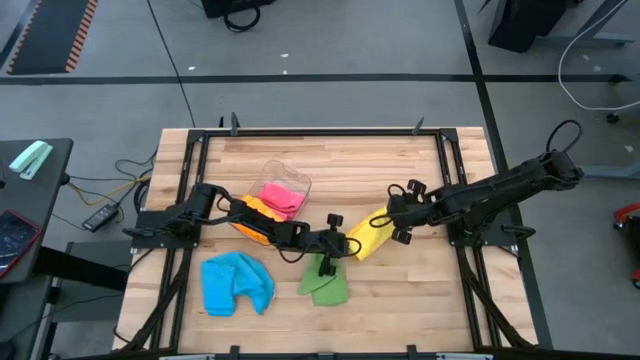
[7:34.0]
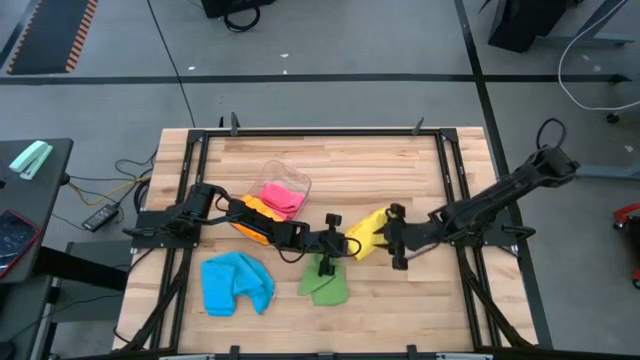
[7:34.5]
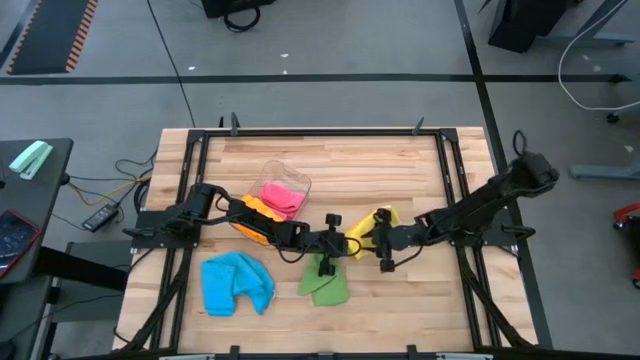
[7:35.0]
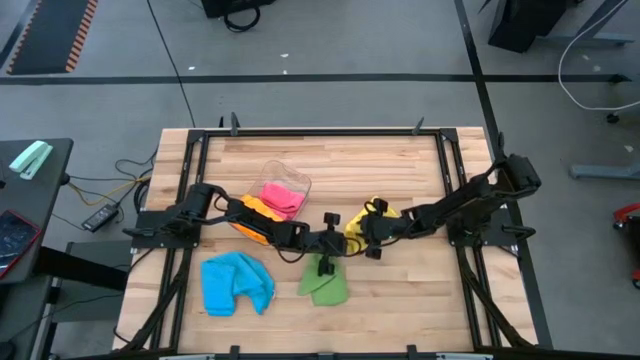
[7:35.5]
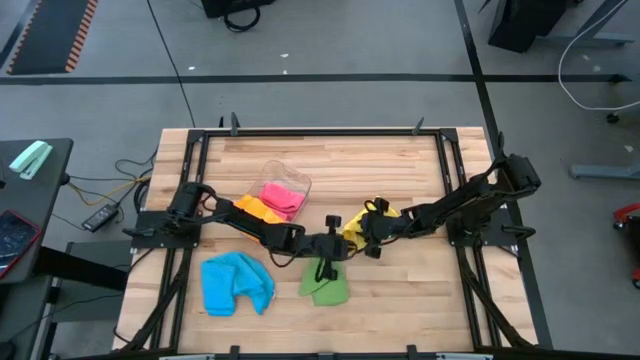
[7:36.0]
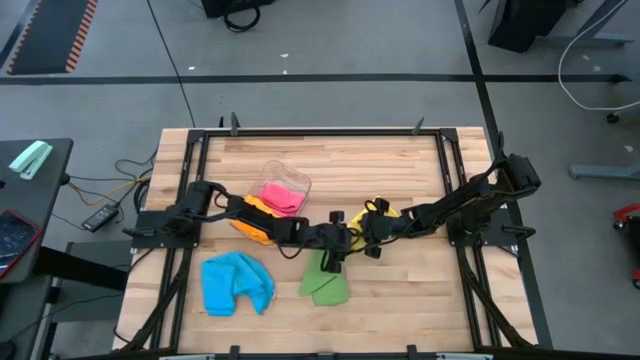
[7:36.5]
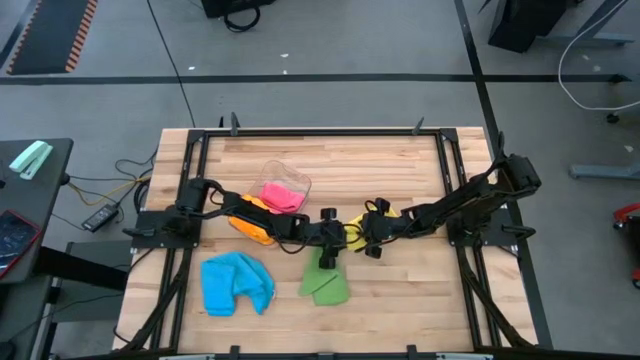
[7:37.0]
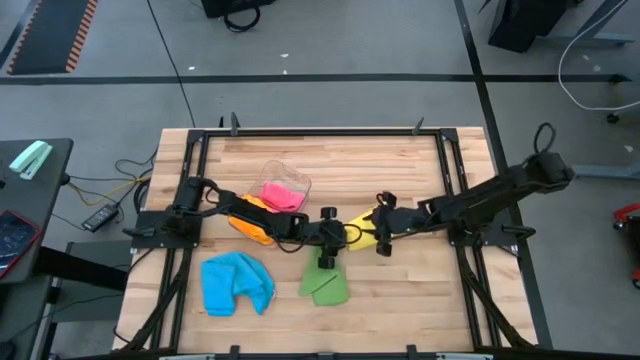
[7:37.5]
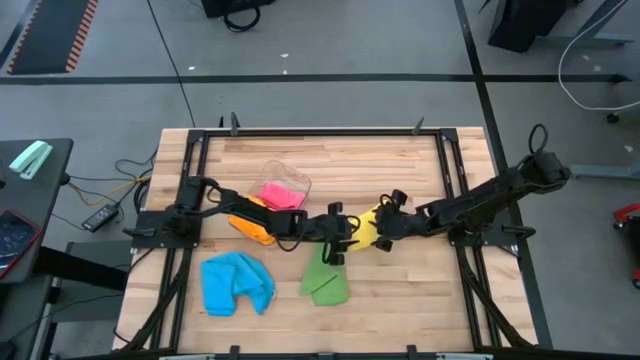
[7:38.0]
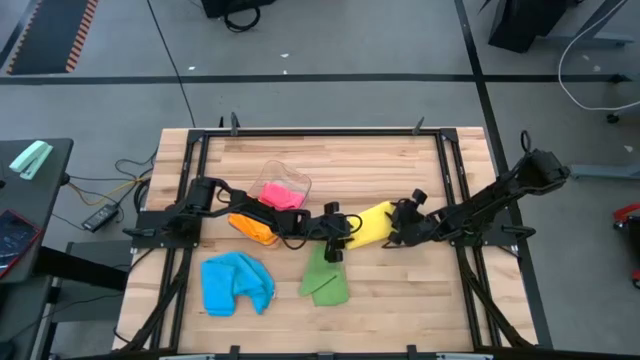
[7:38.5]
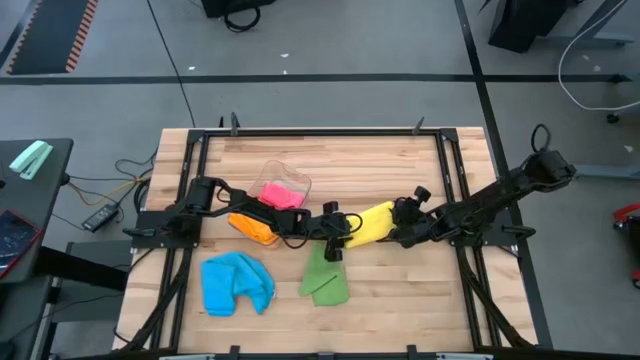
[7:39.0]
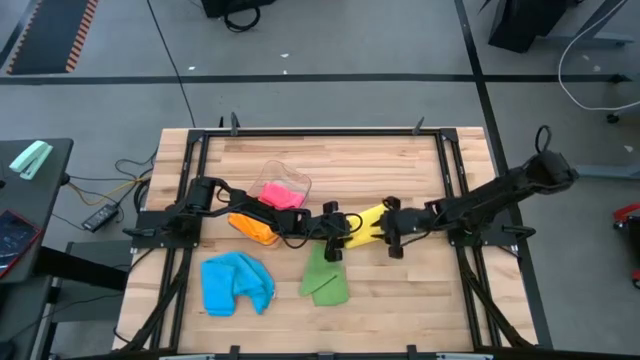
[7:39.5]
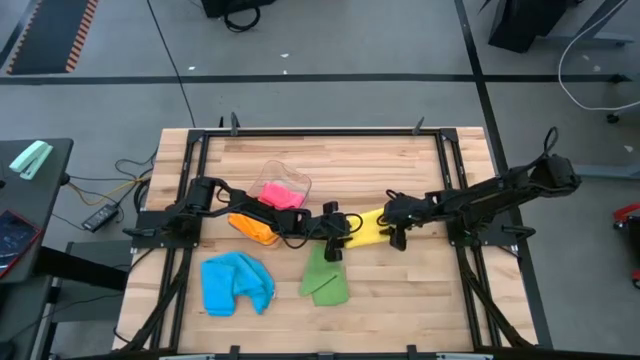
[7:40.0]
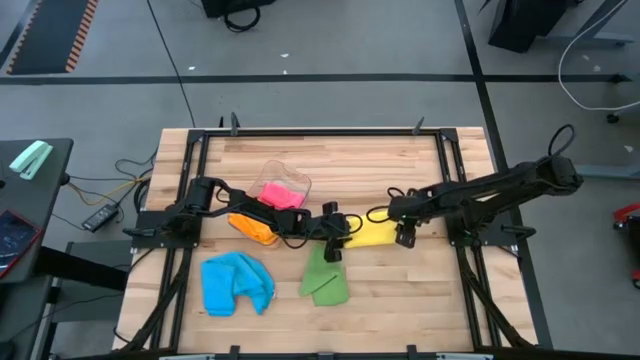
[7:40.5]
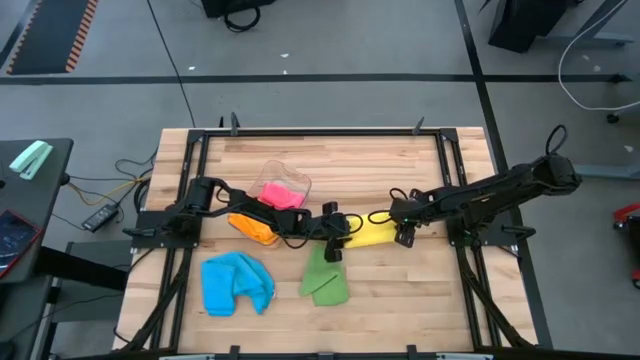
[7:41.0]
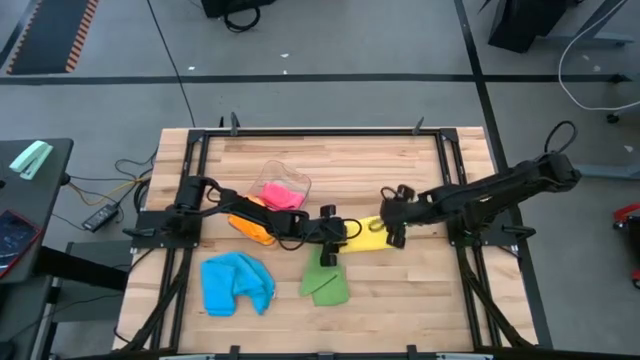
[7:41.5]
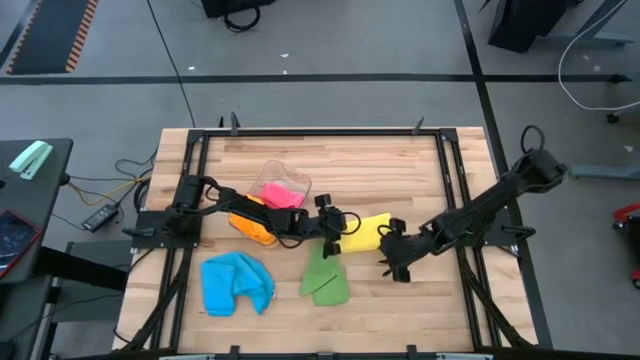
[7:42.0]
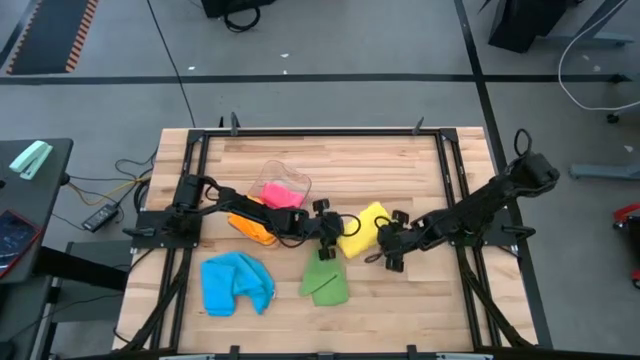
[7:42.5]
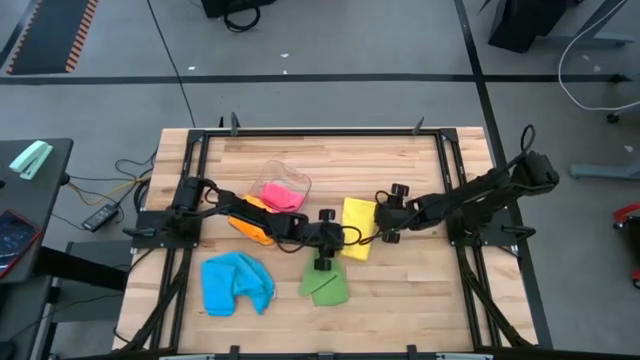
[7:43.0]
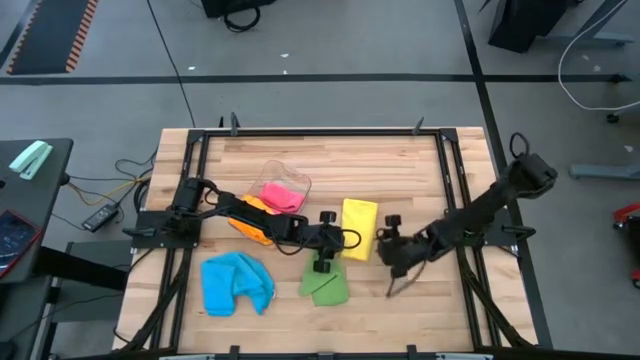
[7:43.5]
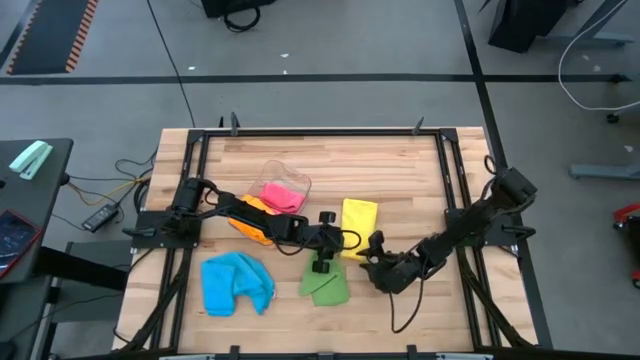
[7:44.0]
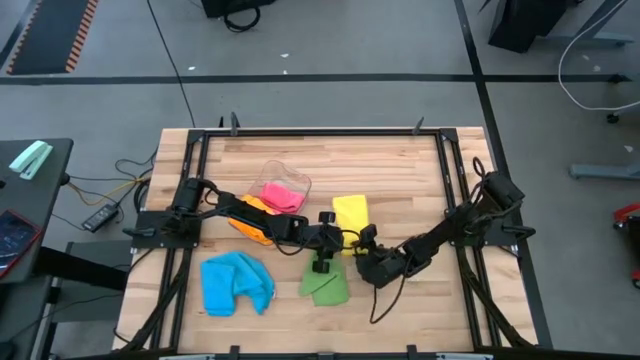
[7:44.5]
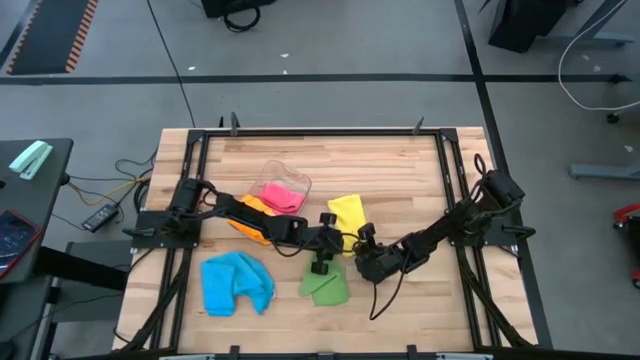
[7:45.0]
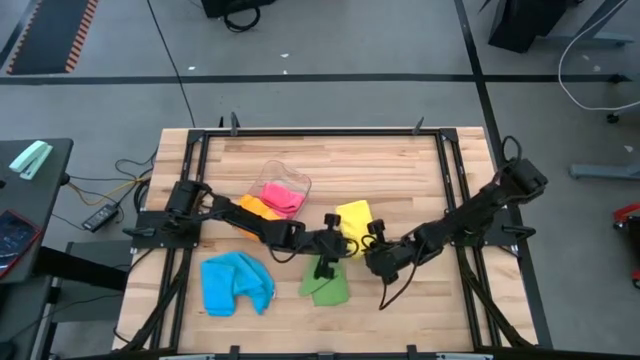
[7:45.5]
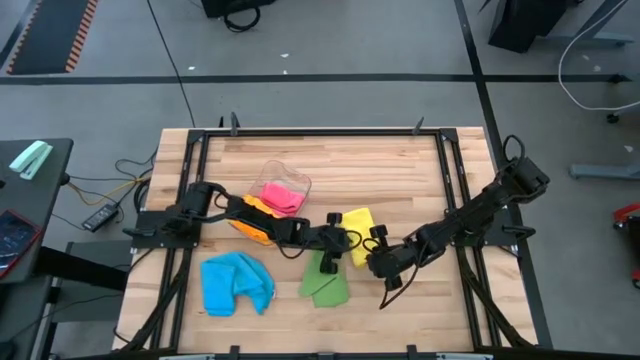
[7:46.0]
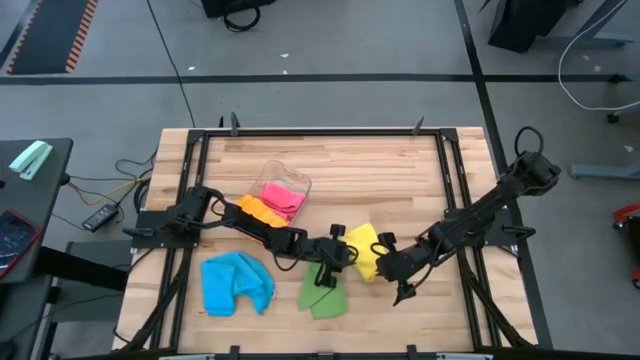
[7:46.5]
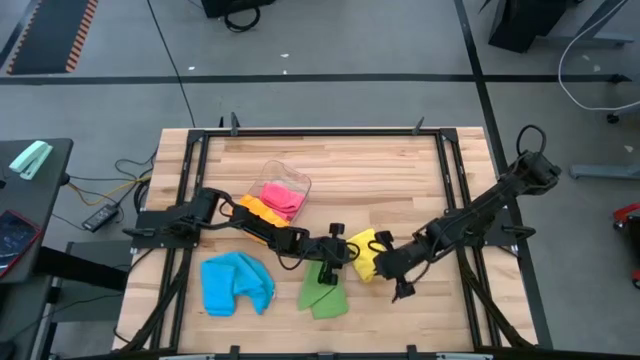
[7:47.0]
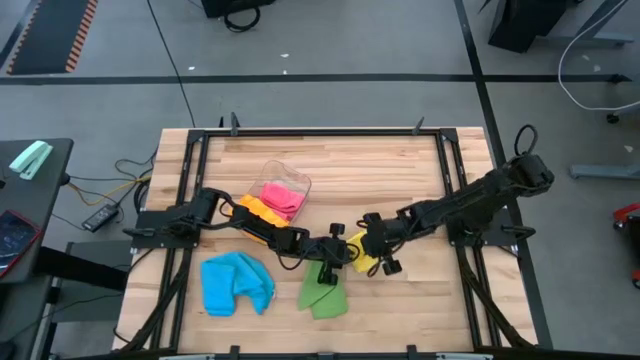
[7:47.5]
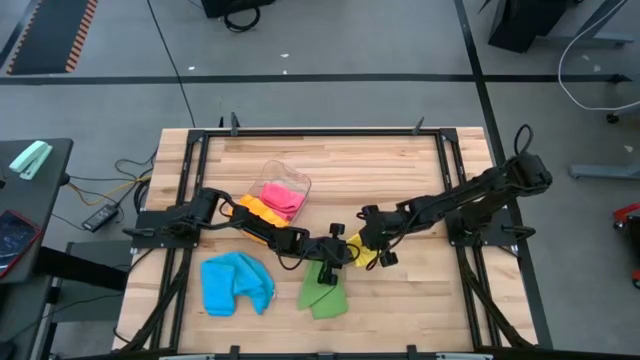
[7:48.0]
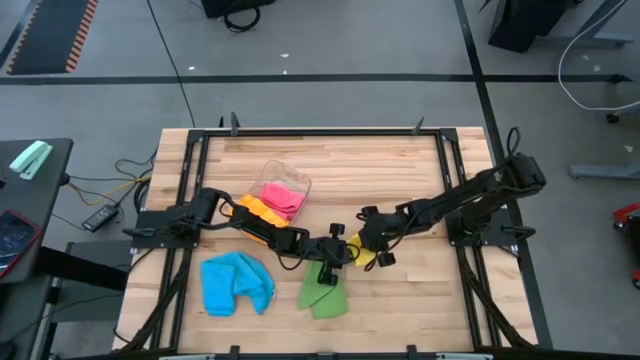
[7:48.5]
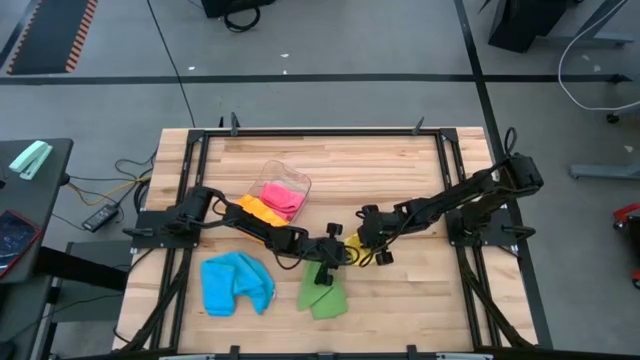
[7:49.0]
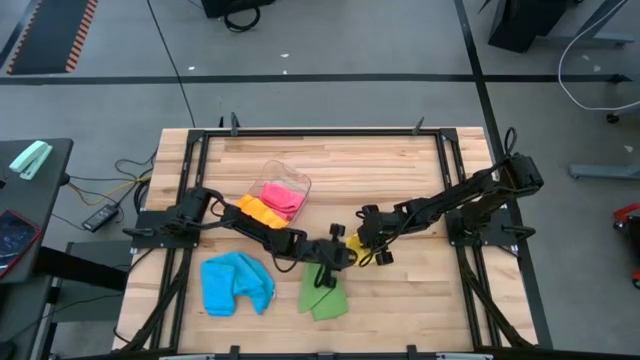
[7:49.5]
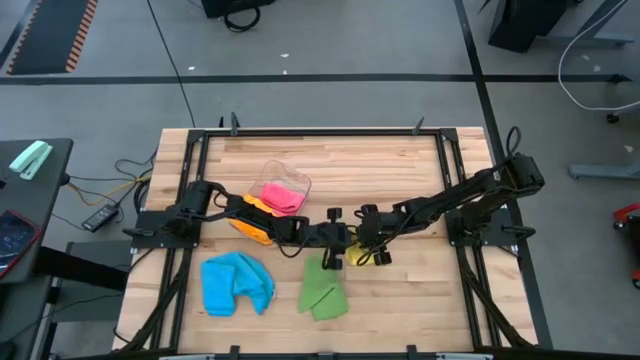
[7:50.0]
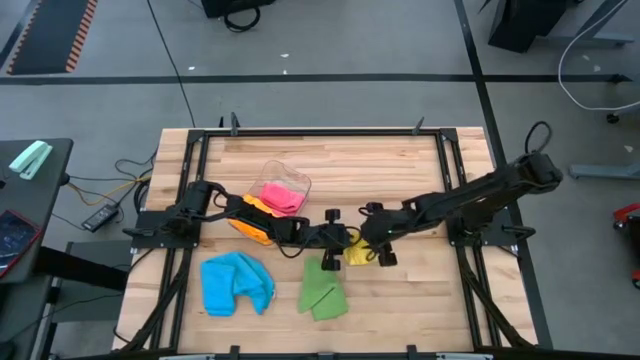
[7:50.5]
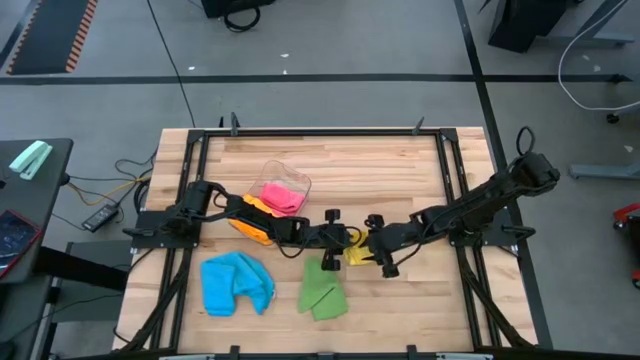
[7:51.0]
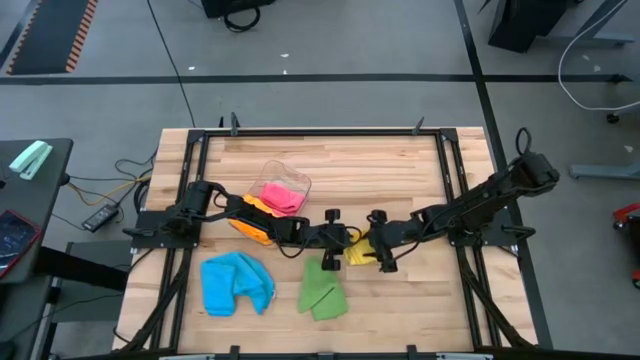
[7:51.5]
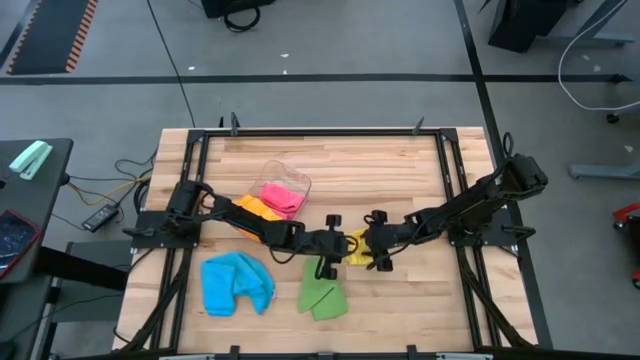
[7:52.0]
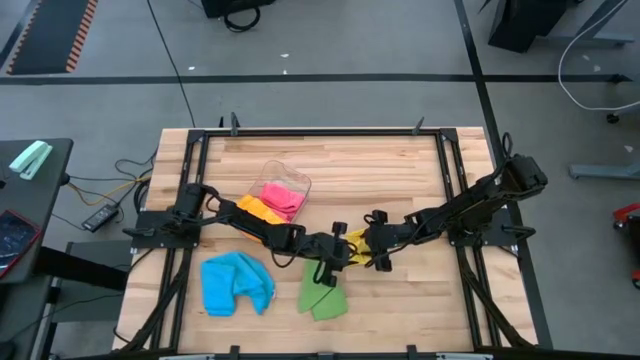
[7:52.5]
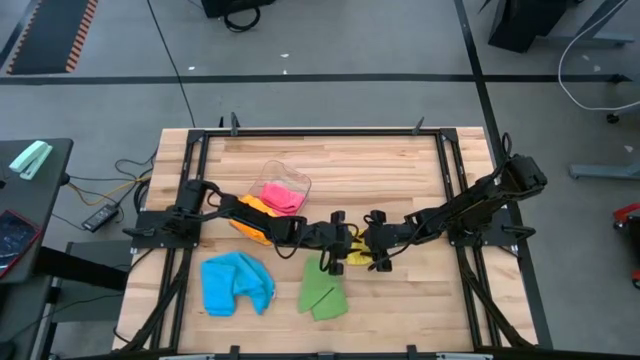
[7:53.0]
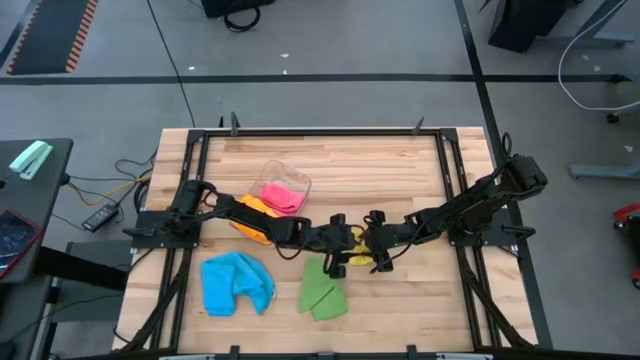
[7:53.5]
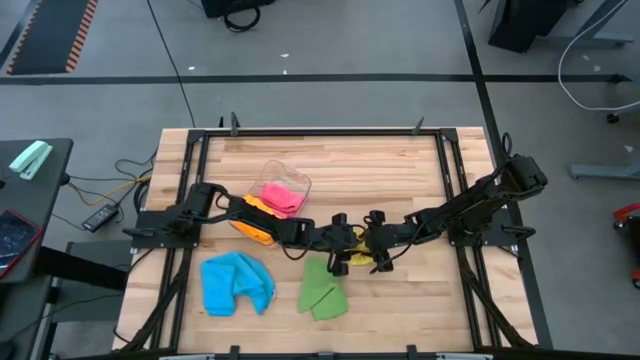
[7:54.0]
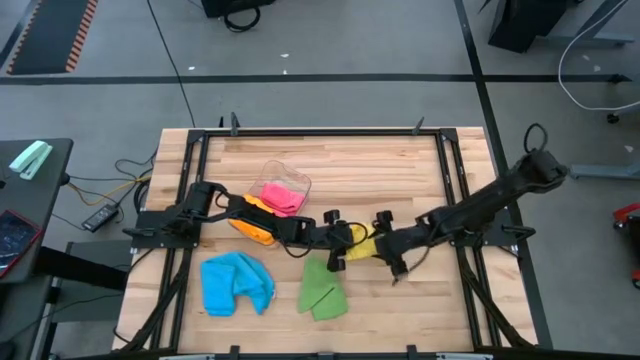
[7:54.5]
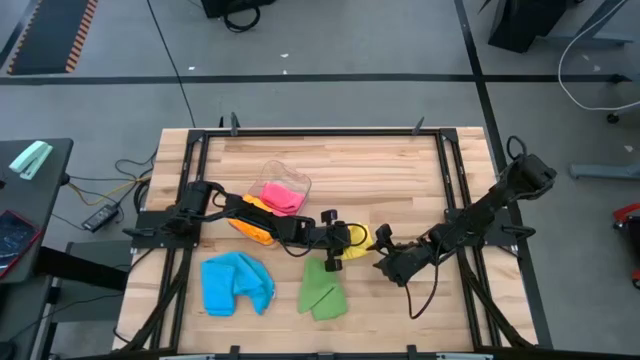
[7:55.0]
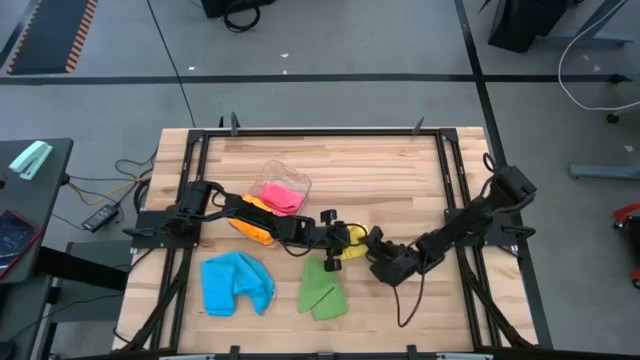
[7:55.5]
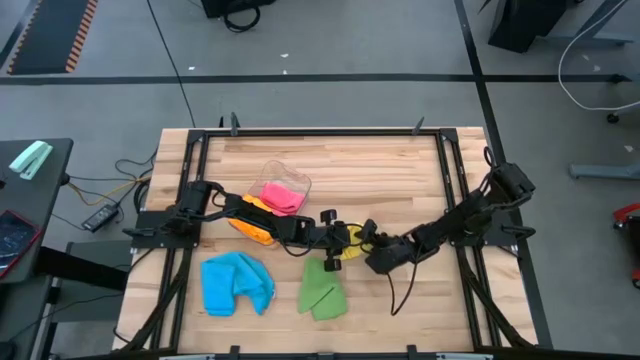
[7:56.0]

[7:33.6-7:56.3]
Task: Fold microfiber towels
Fold the yellow microfiber towel
